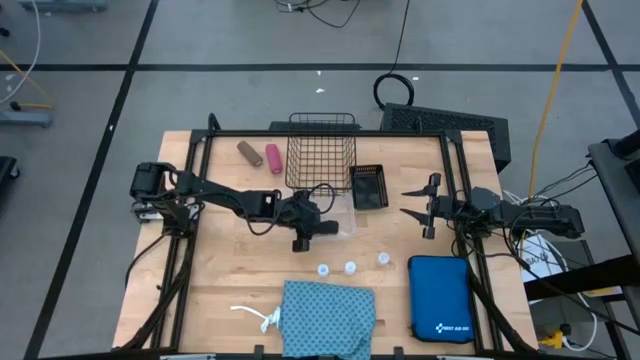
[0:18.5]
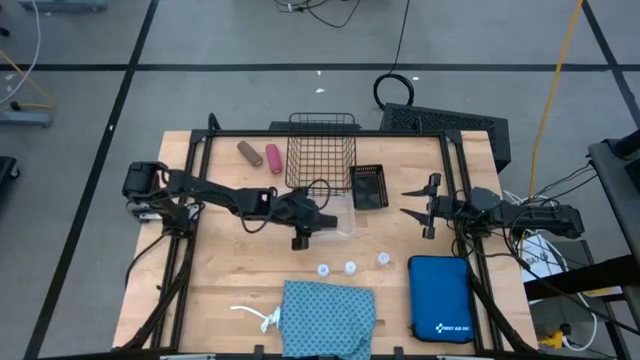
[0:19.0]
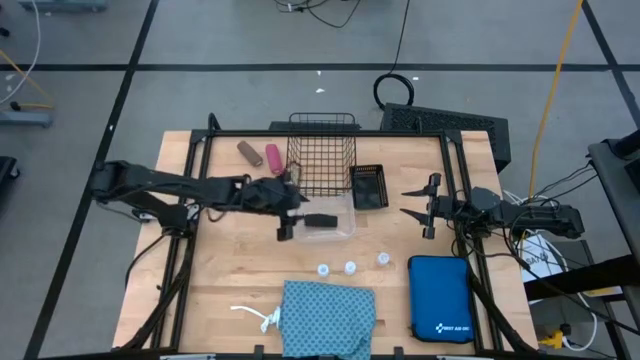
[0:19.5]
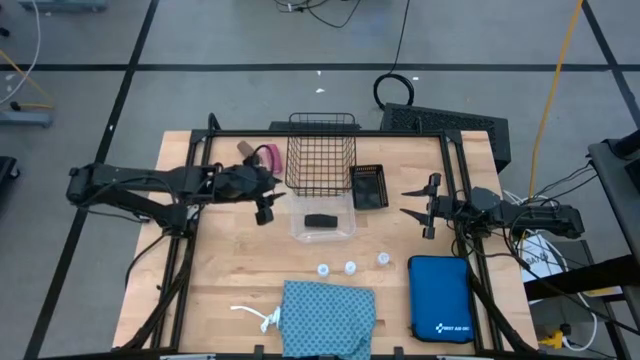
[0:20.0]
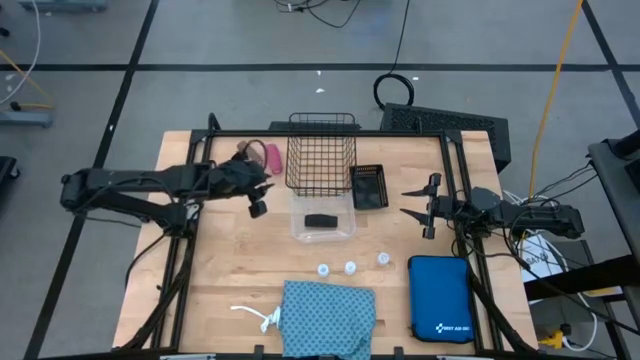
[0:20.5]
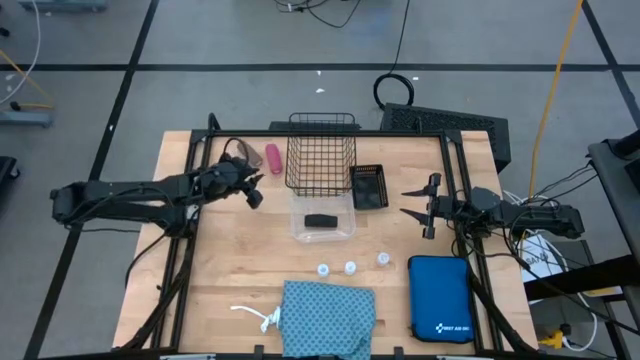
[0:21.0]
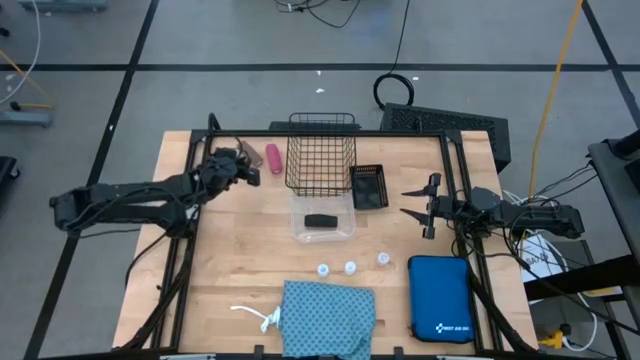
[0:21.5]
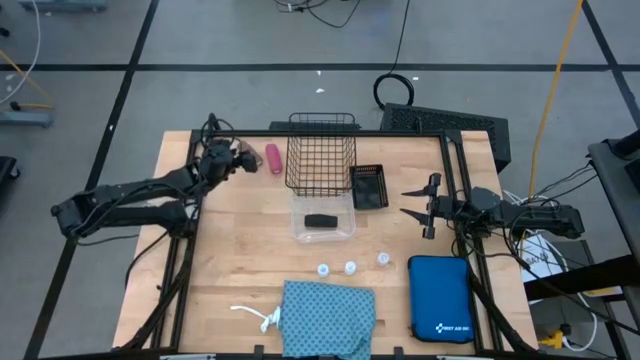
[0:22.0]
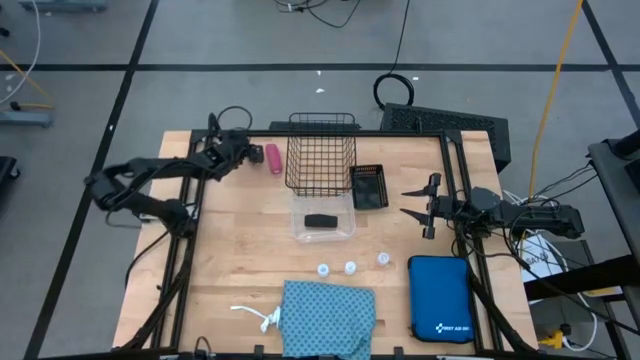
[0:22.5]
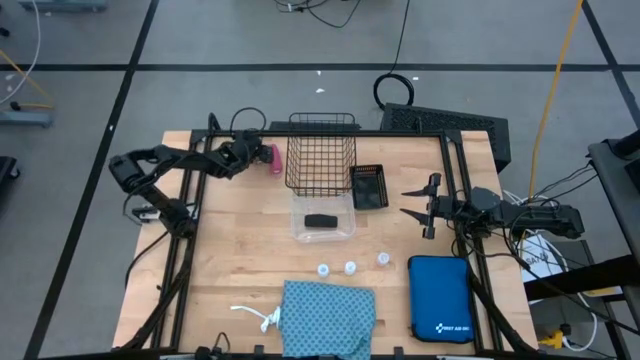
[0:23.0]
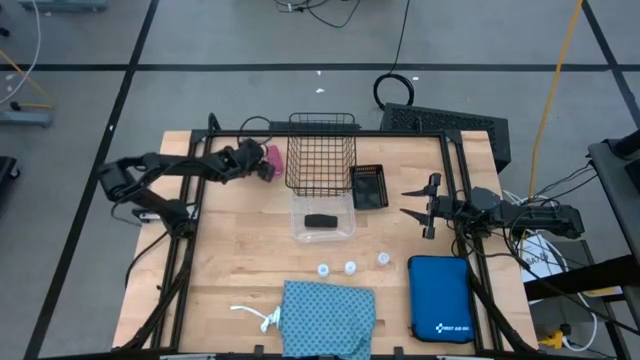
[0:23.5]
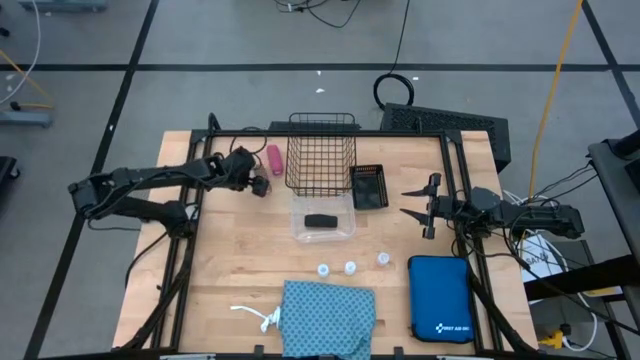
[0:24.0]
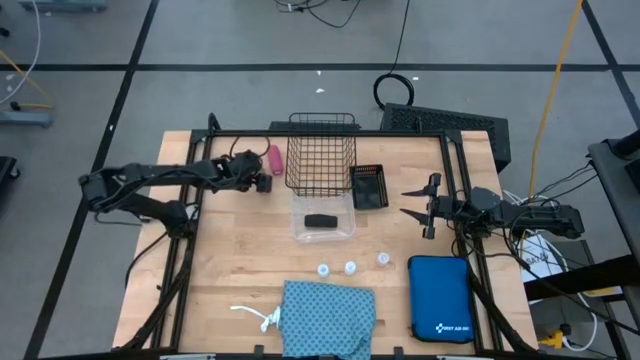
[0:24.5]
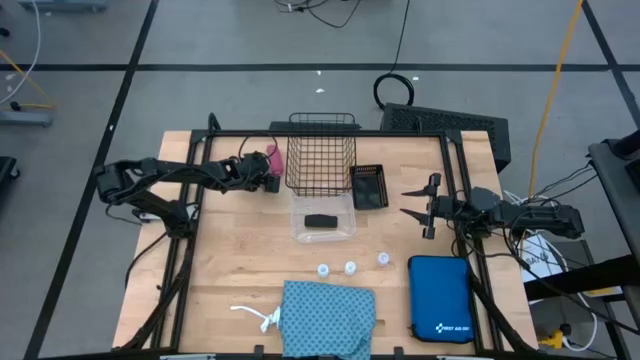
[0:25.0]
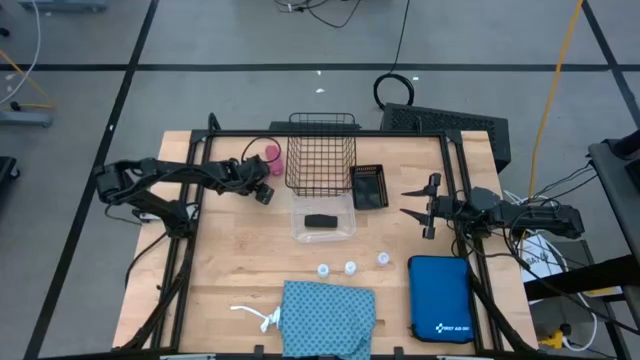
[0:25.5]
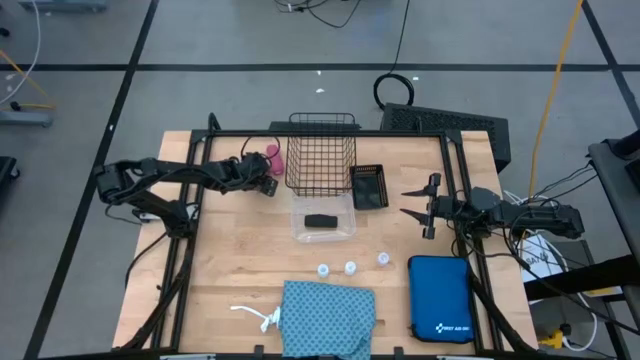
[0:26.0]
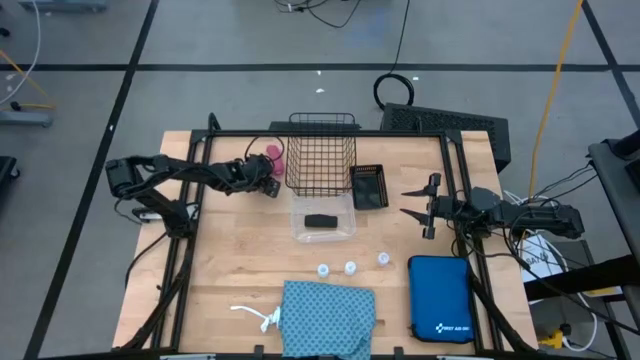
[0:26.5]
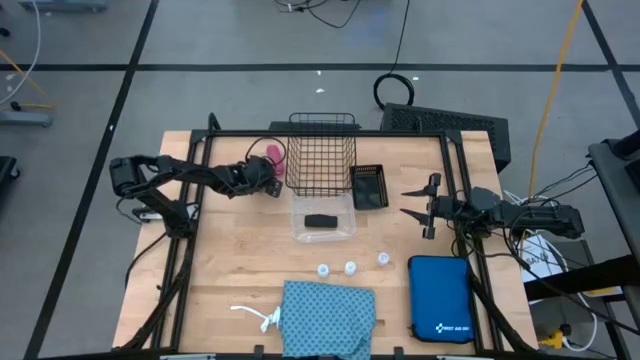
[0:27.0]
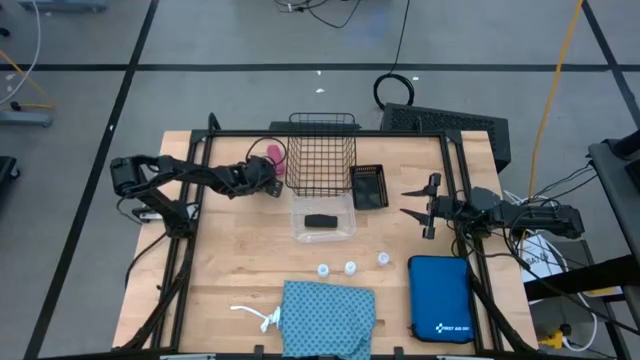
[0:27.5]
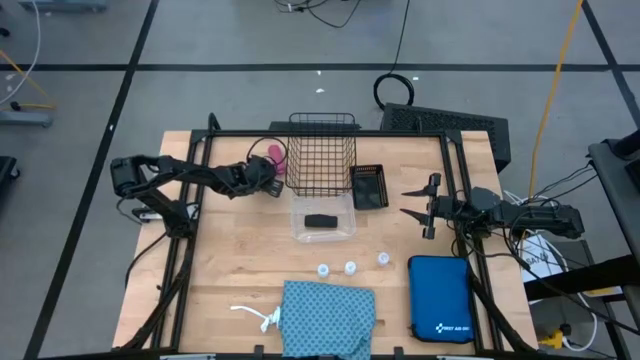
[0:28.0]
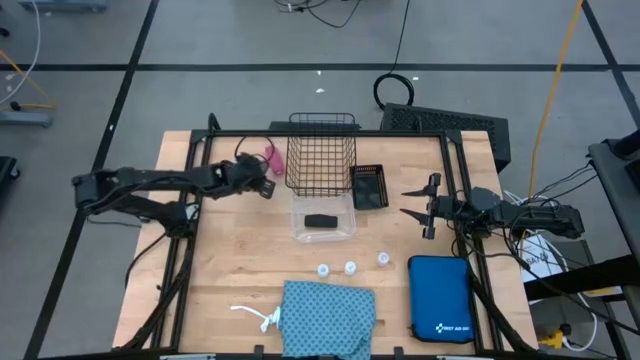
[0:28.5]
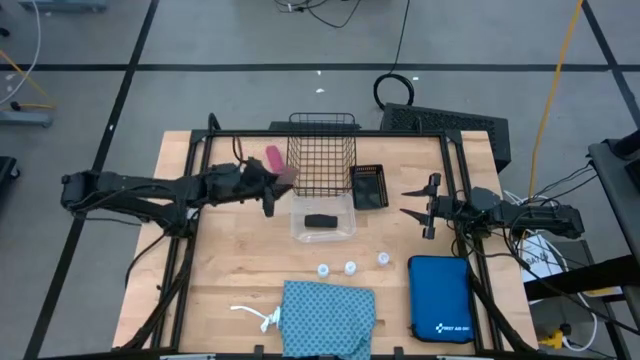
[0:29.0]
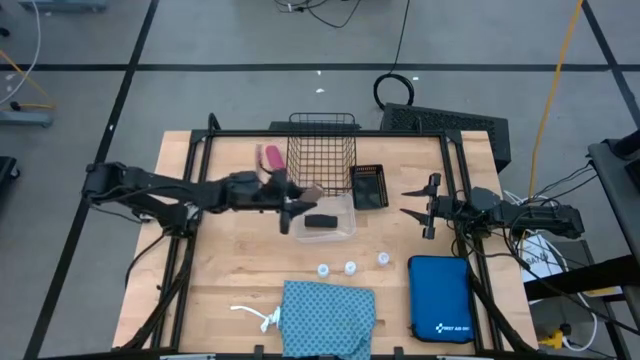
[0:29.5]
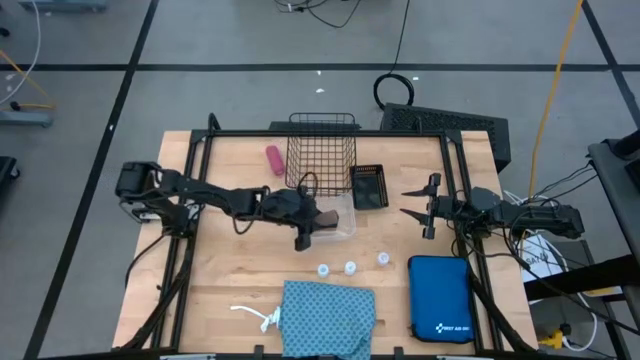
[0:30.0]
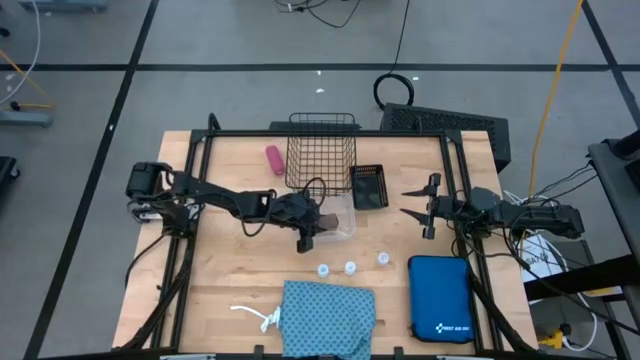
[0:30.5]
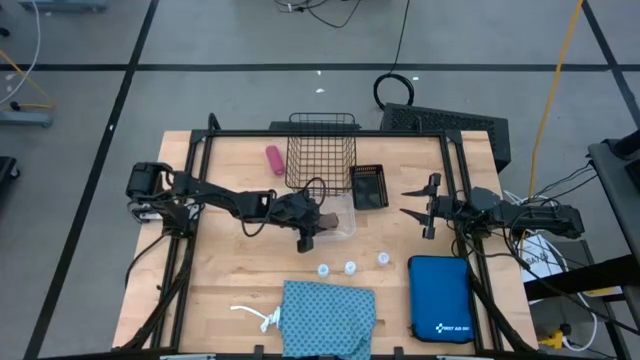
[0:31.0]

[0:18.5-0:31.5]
Task: Pick & Place Medicine items
Put the brown bandage into the transparent bin

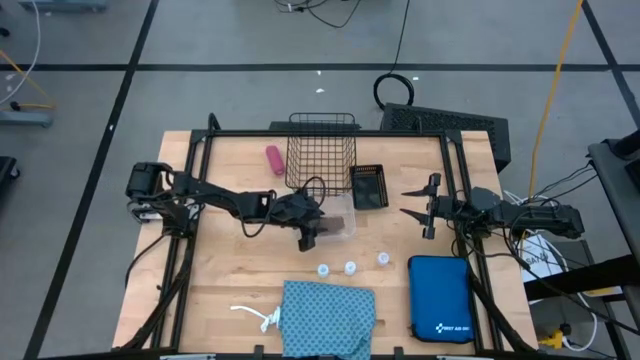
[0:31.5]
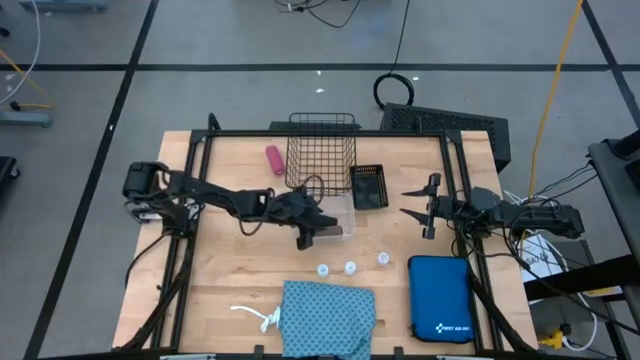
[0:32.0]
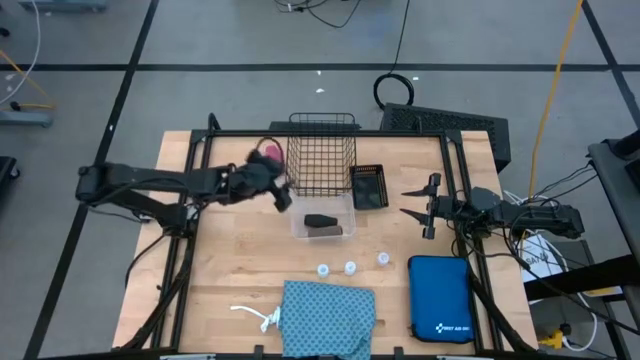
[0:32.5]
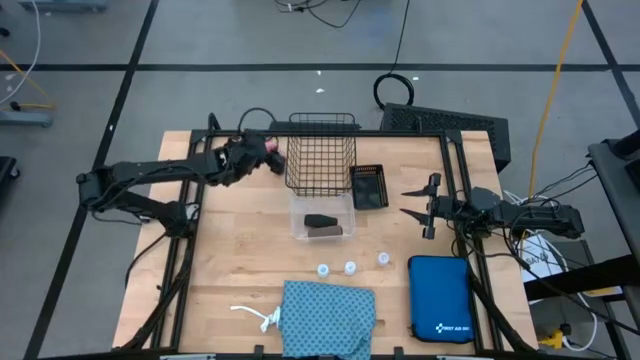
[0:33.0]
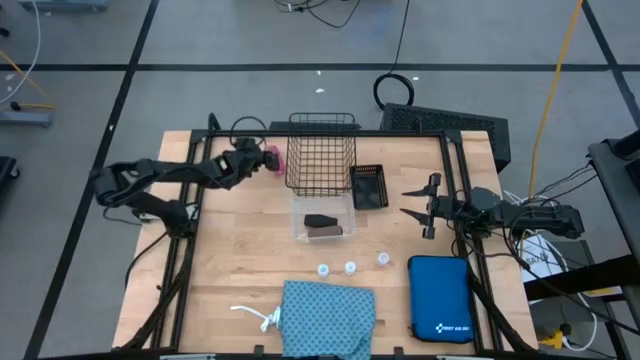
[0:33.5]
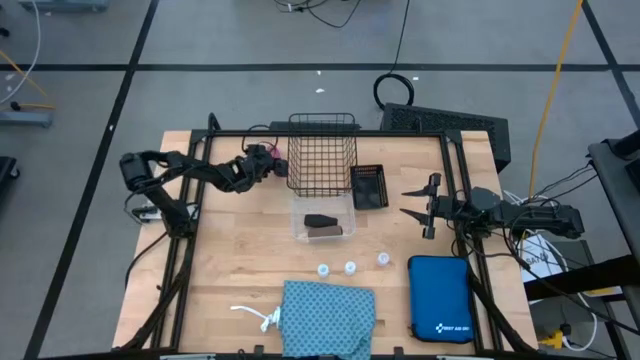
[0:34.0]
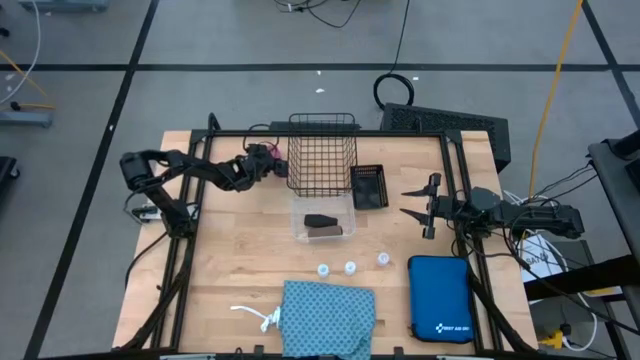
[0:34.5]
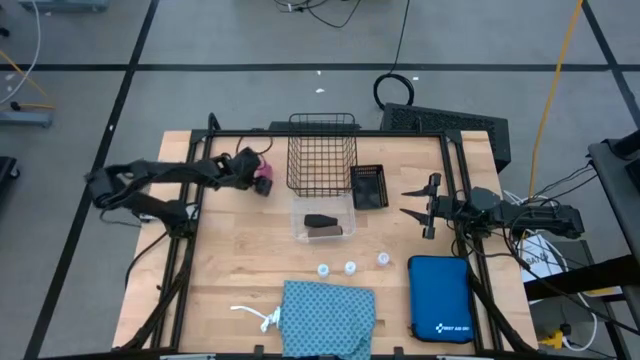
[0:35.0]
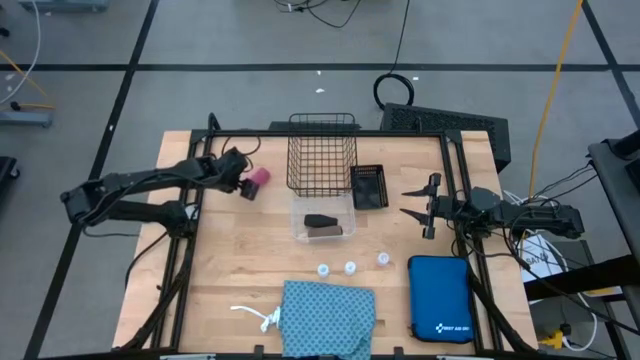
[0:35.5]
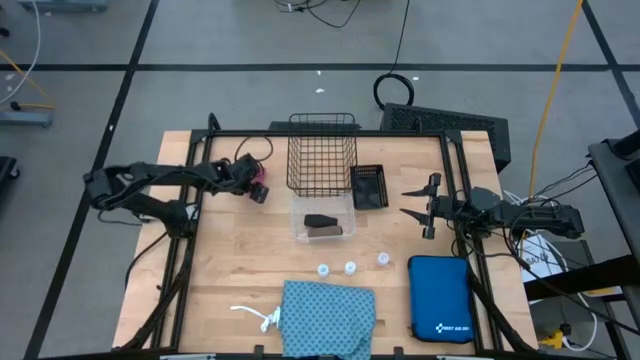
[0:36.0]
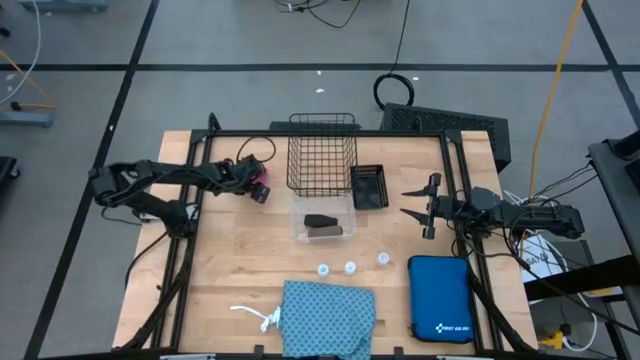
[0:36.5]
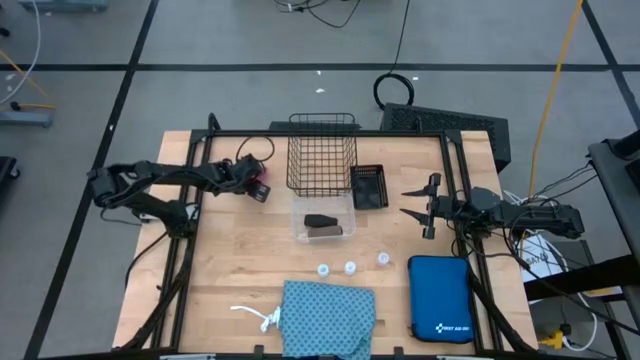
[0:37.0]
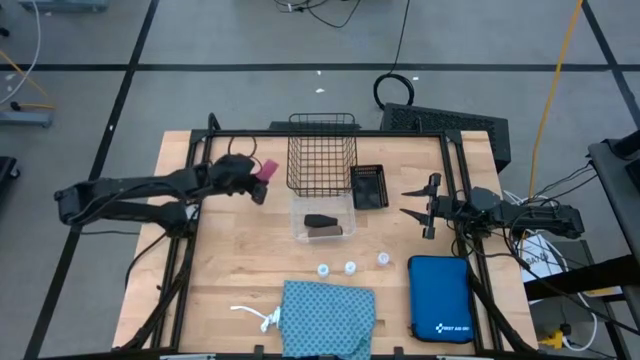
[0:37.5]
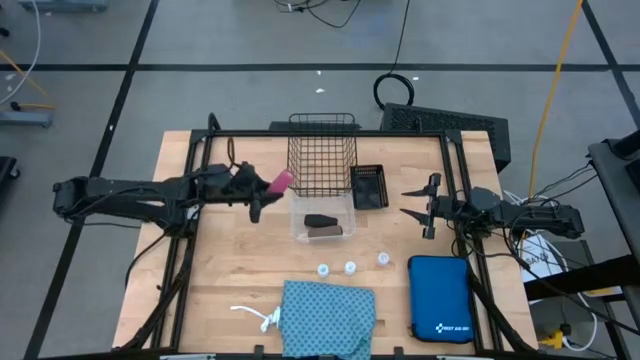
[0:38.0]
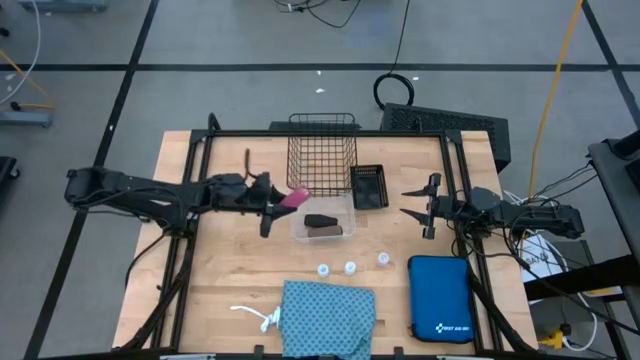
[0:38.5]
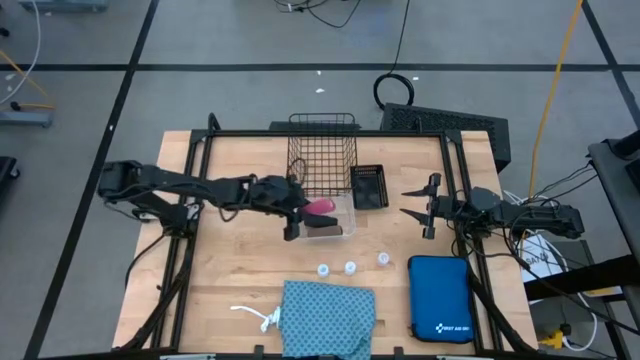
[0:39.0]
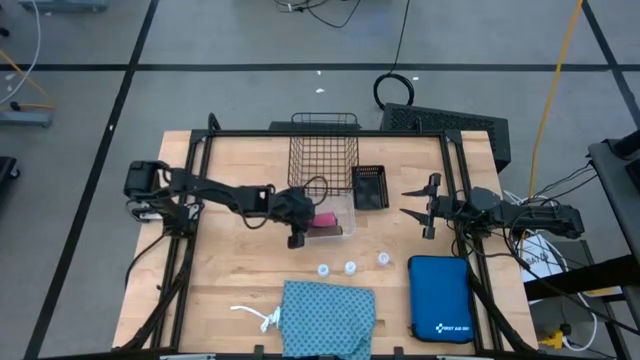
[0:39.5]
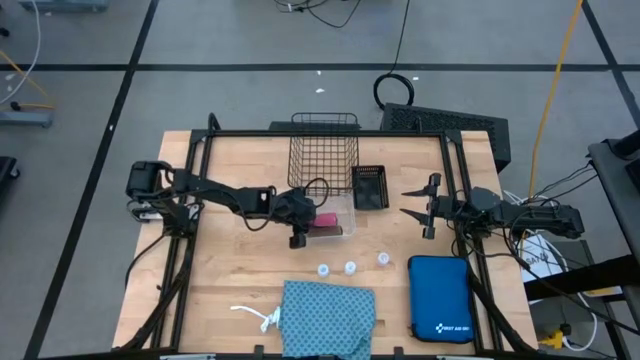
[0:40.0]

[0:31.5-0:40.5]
Put the pink bandage into the transparent bin
